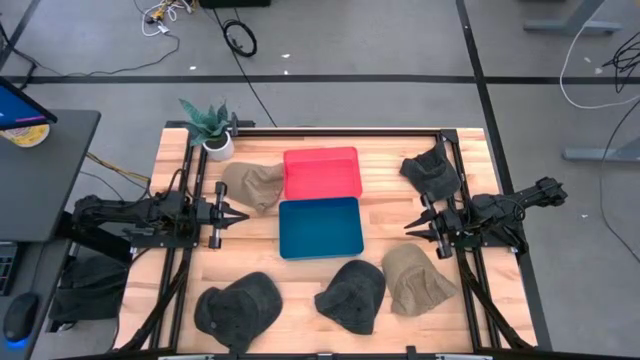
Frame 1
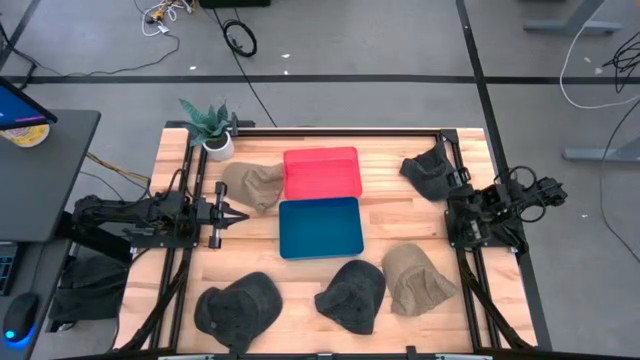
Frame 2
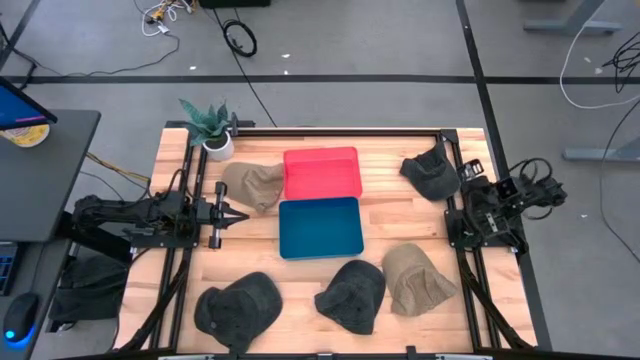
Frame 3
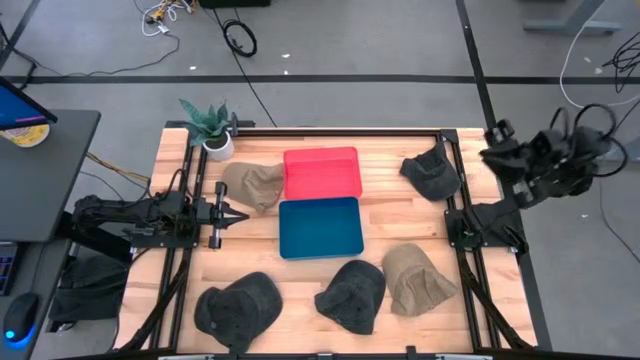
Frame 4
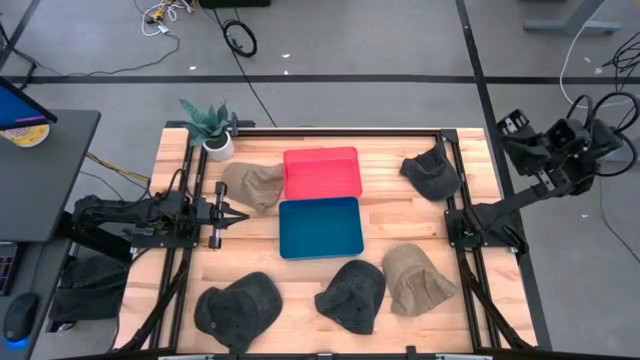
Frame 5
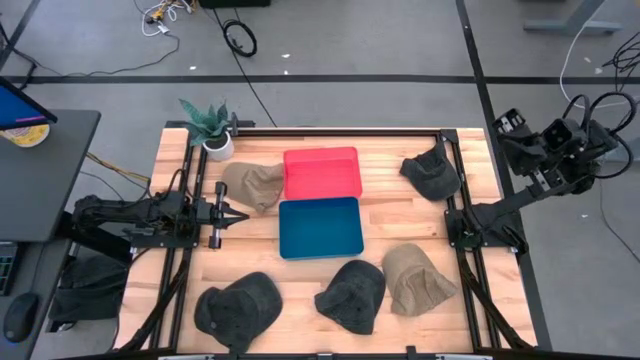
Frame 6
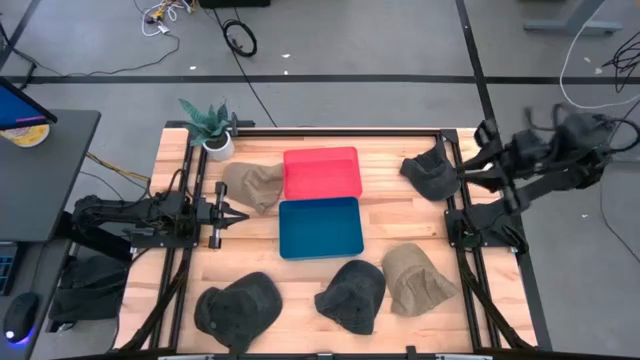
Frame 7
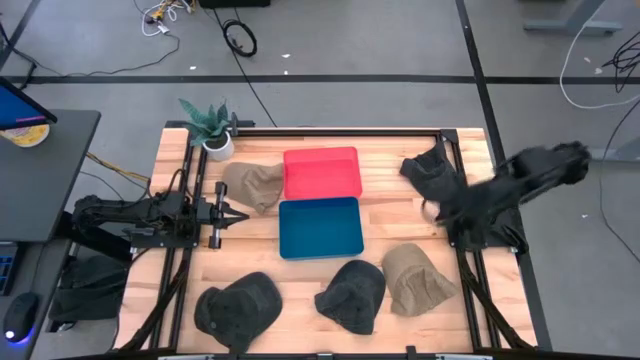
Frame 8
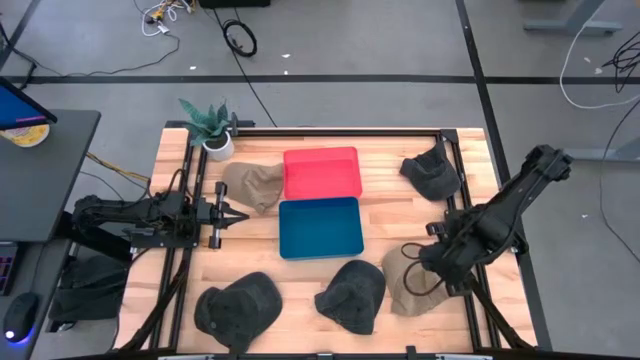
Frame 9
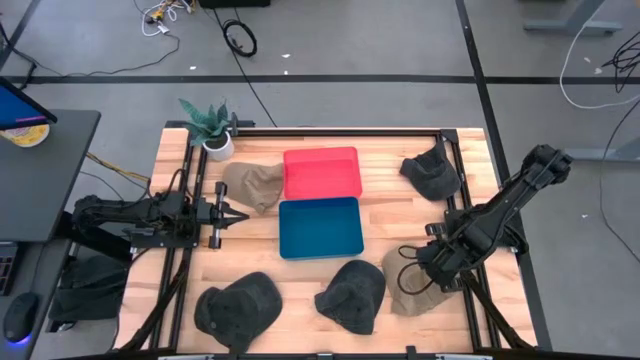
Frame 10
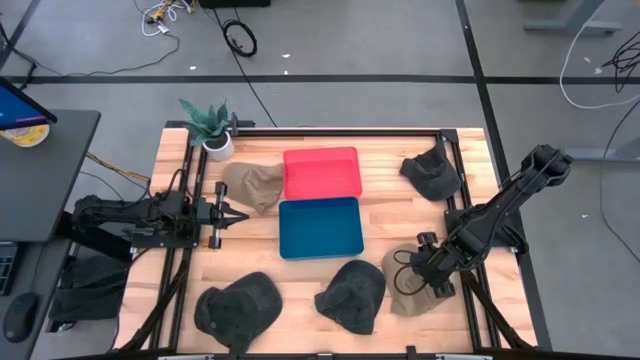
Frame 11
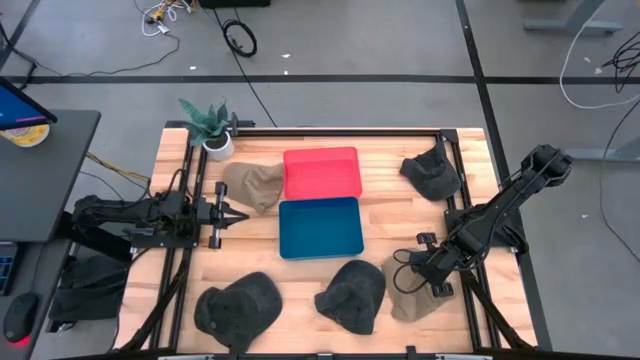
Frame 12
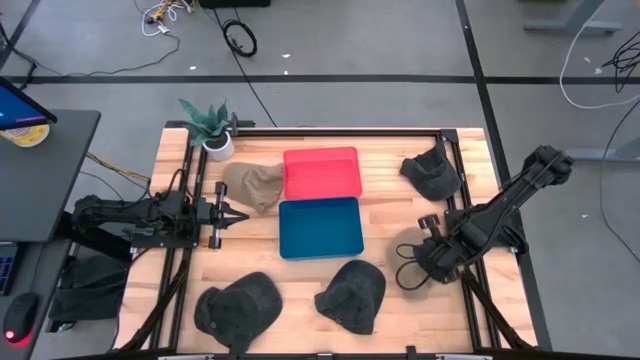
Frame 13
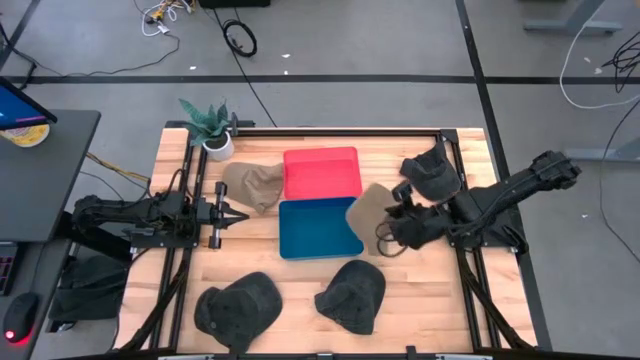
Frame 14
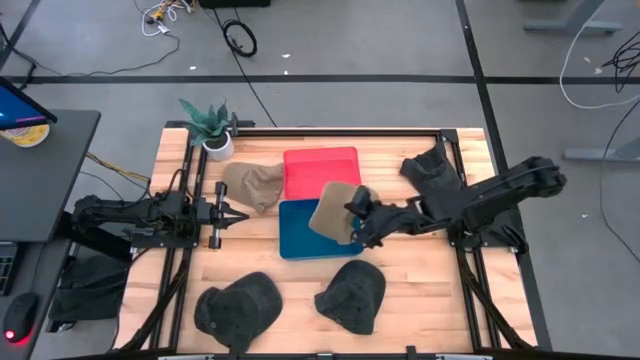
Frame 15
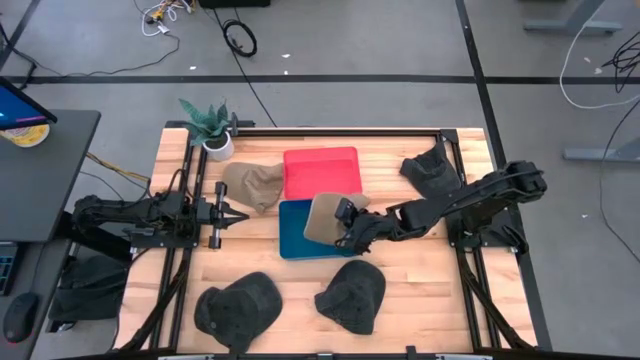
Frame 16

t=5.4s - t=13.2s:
Task: Pick & Place hat
Put the bottom brown cap into the blue bin

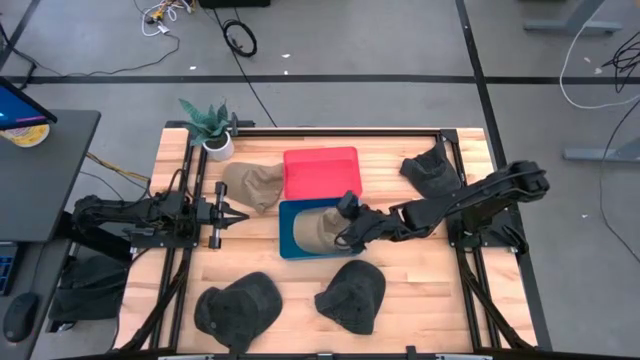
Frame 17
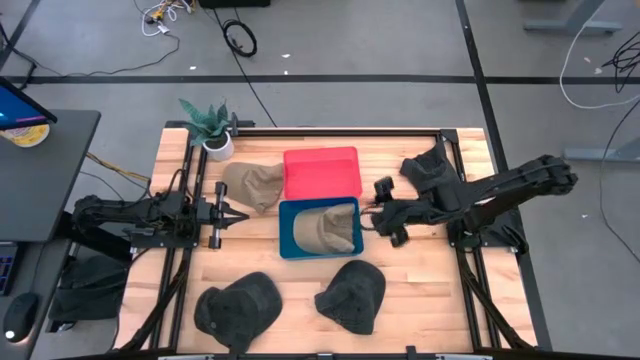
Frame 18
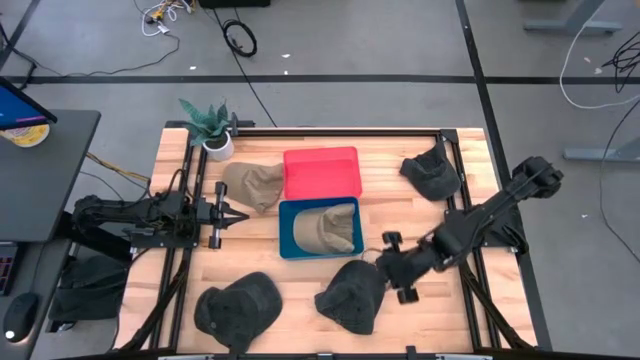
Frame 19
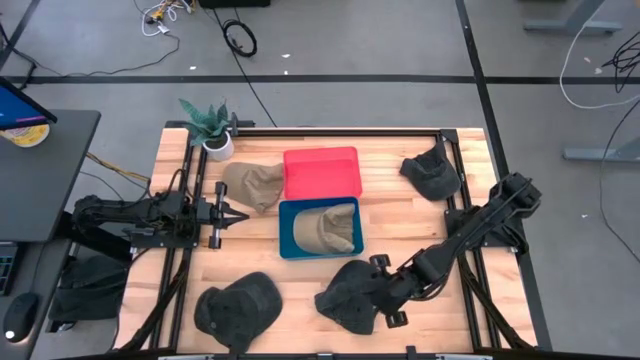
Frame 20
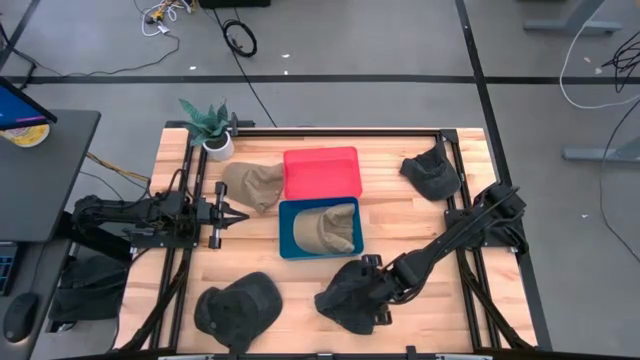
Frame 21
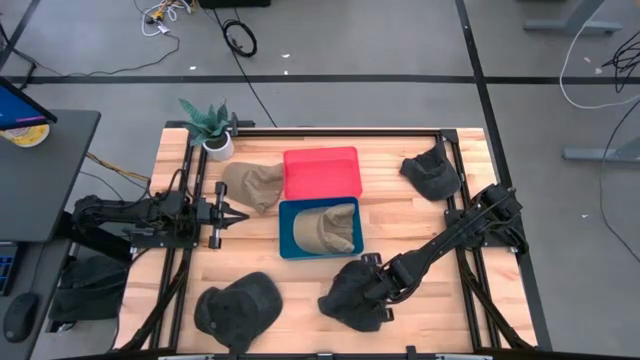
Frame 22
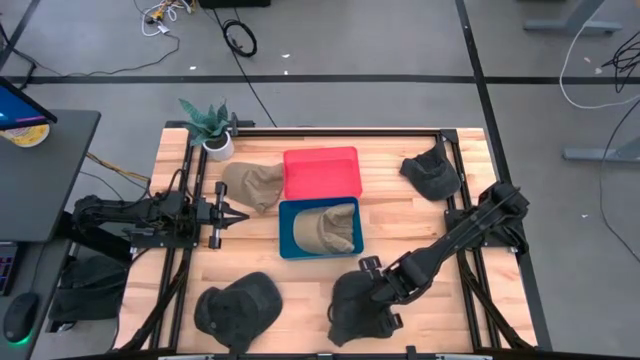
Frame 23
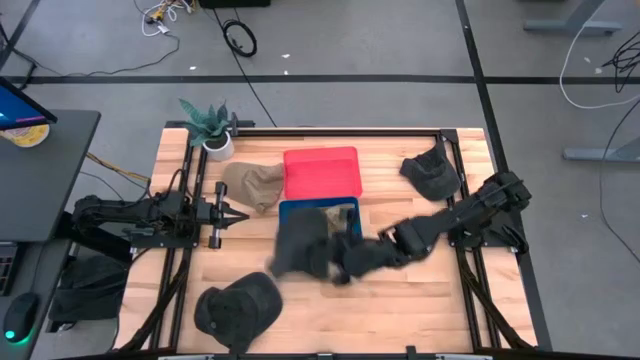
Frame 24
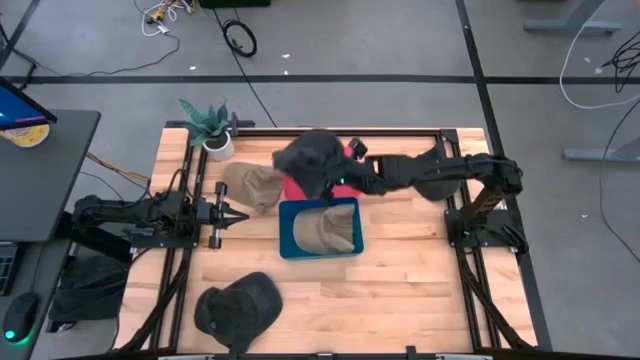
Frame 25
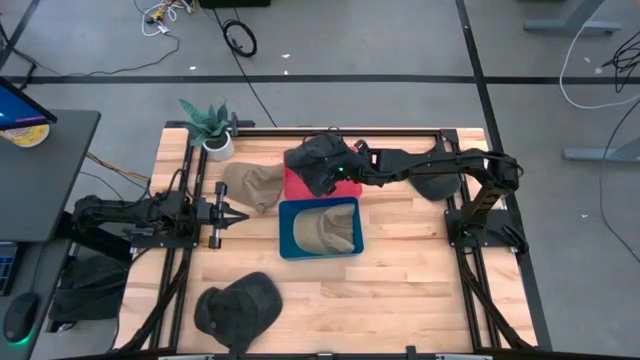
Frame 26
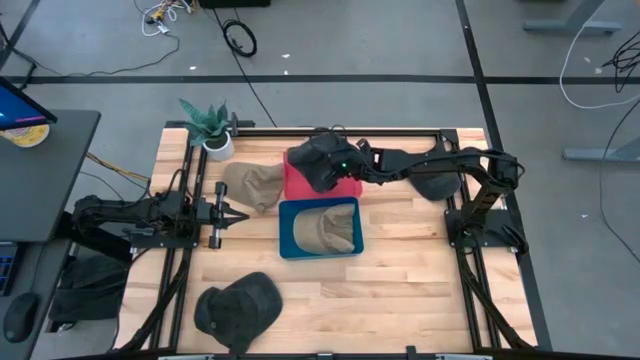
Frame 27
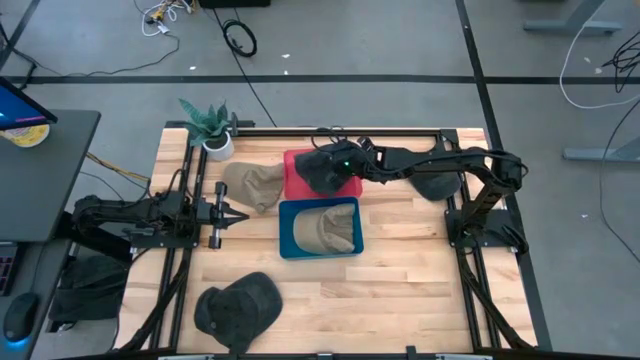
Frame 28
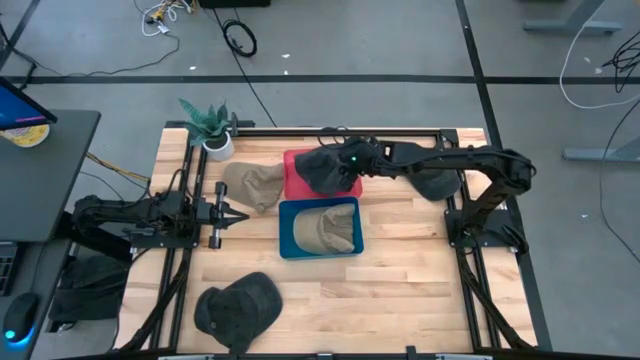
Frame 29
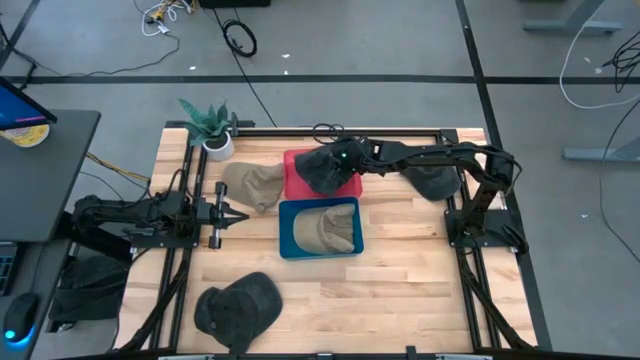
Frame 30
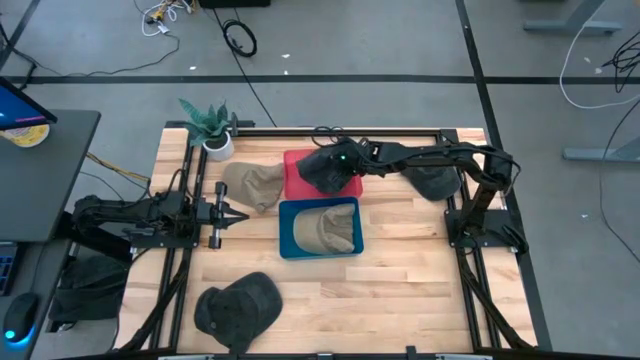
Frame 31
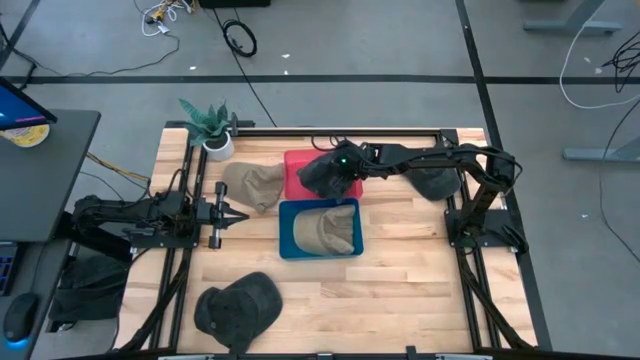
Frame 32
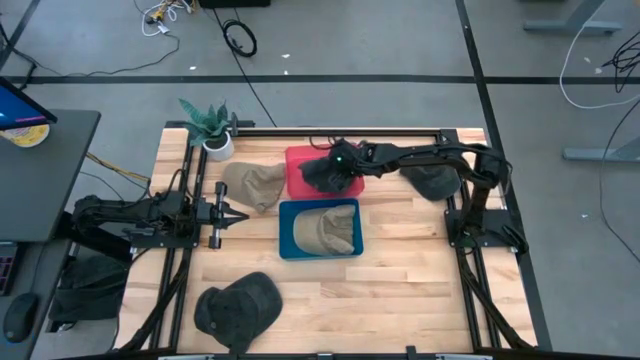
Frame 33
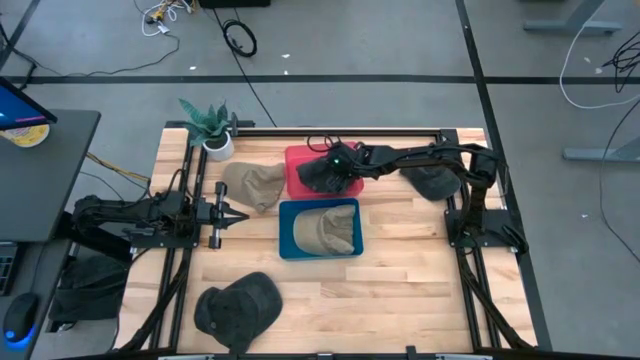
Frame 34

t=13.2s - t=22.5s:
Put the bottom right black cap into the red bin

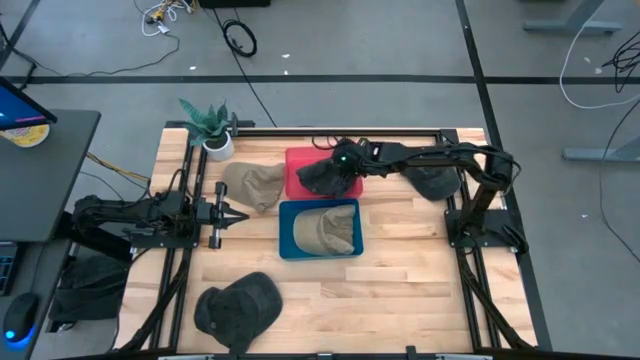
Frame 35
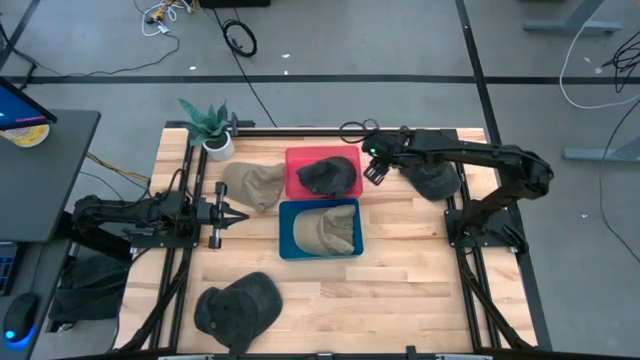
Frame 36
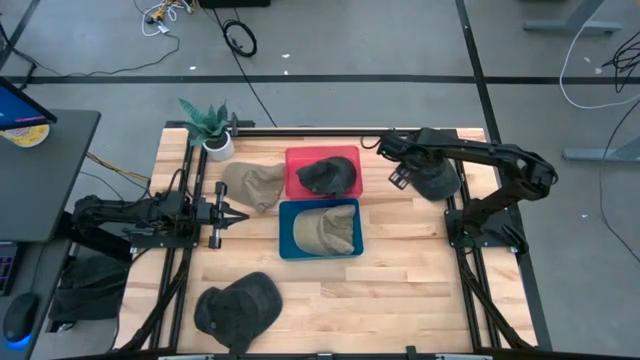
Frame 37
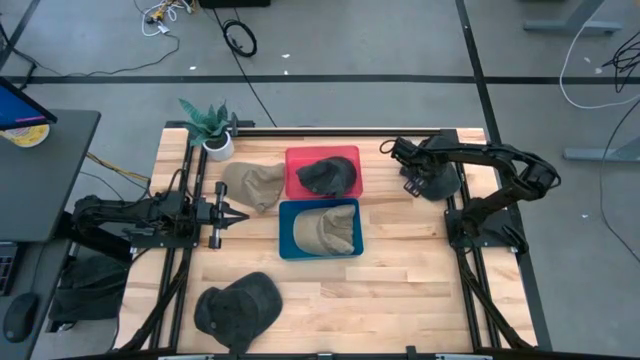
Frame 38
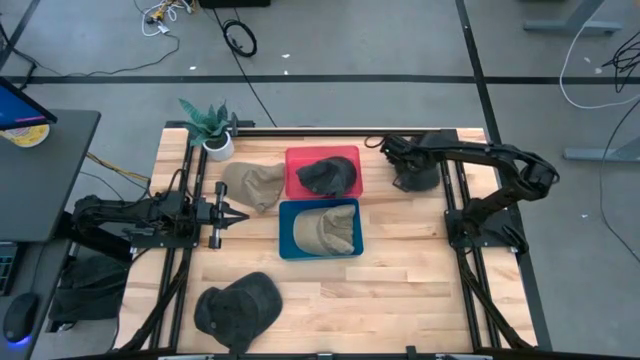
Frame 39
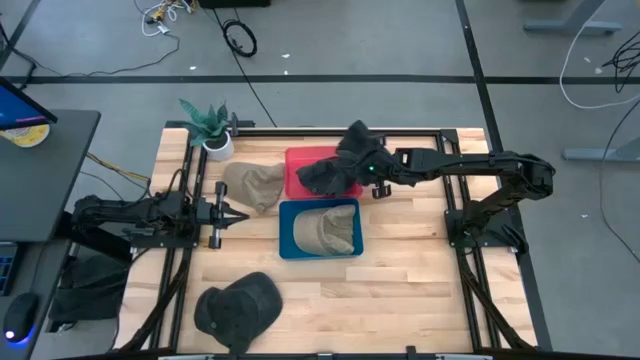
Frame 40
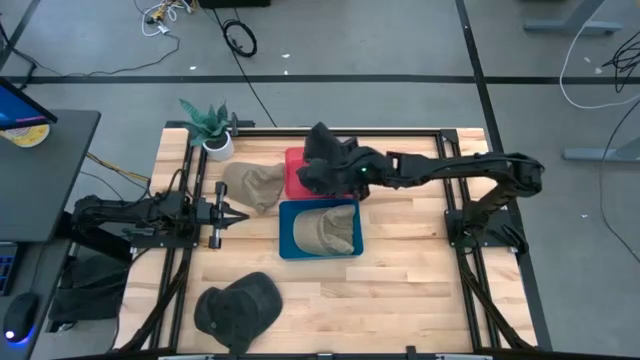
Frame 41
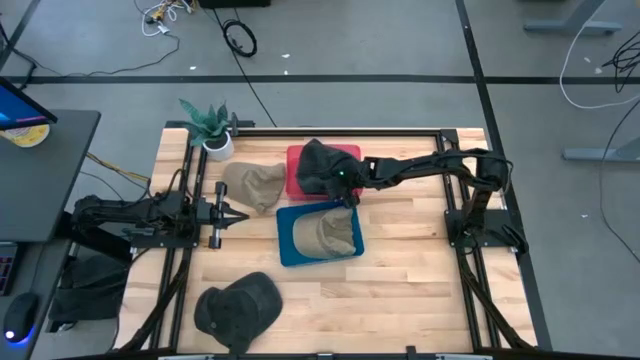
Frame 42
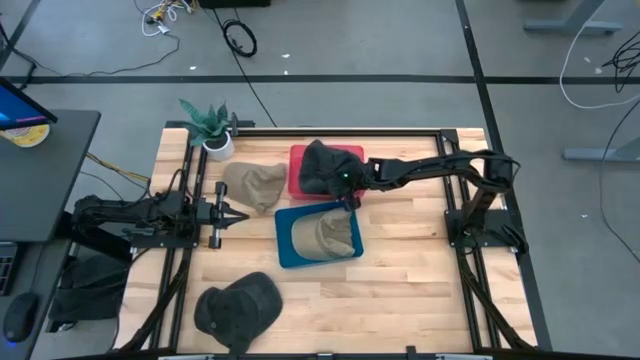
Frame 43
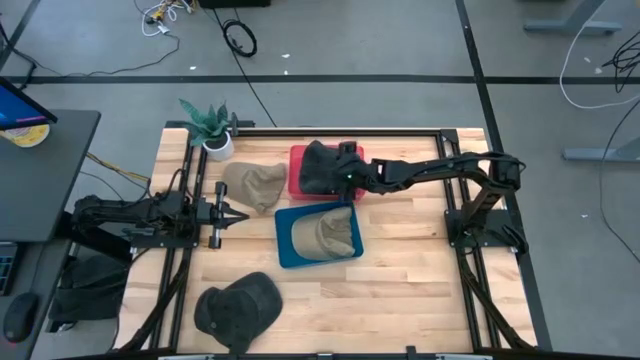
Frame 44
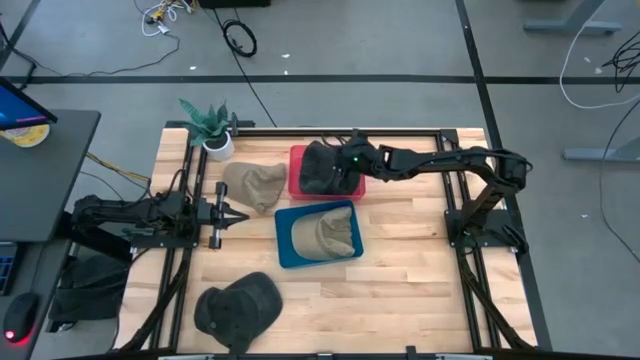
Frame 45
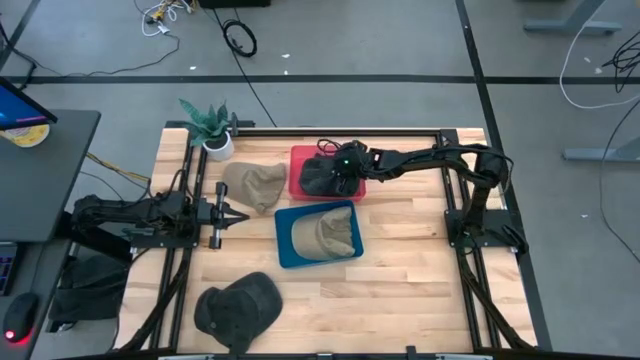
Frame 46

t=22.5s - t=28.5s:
Put the top black cap into the red bin
